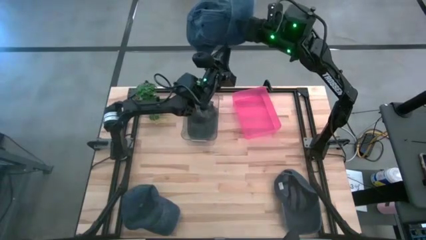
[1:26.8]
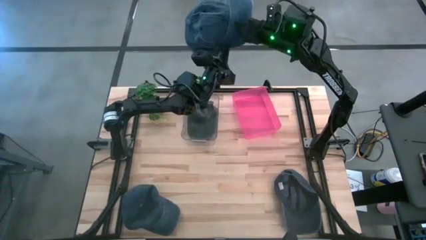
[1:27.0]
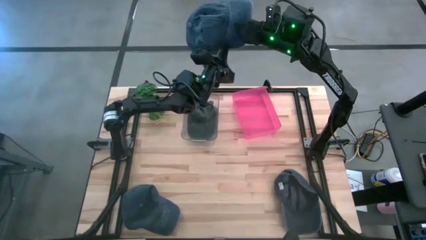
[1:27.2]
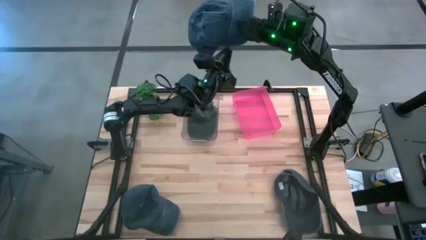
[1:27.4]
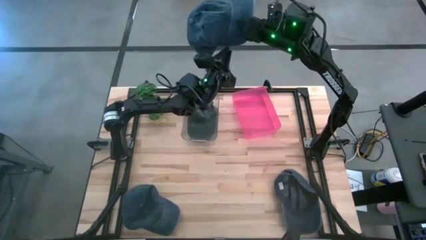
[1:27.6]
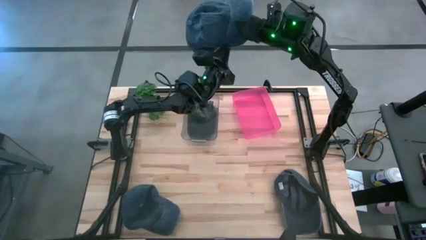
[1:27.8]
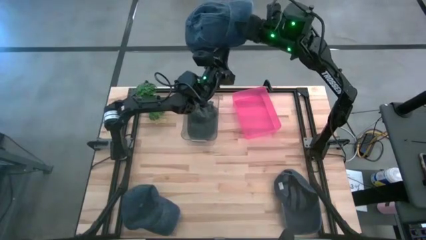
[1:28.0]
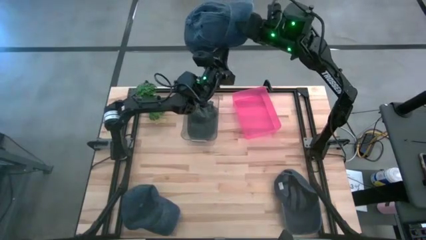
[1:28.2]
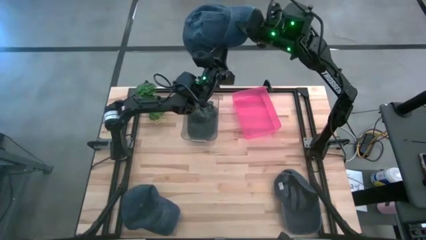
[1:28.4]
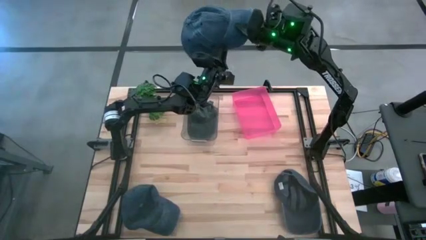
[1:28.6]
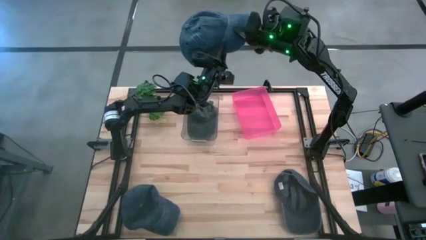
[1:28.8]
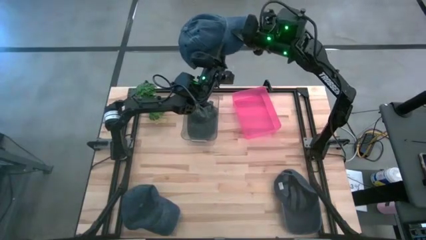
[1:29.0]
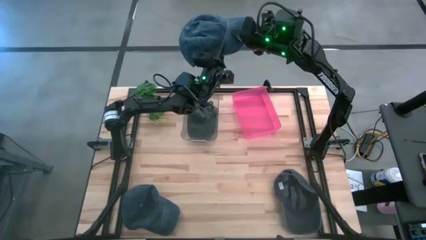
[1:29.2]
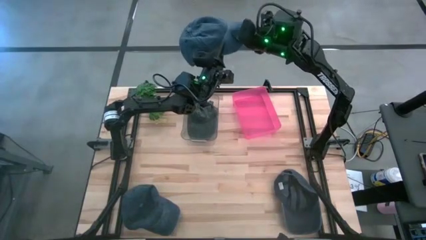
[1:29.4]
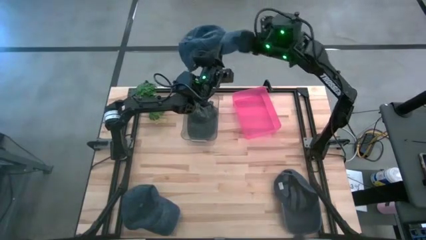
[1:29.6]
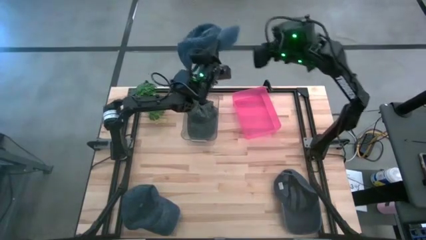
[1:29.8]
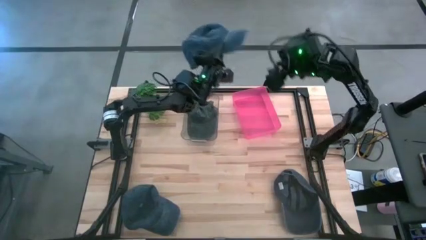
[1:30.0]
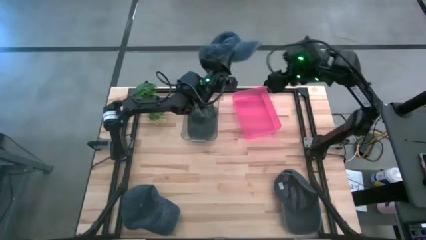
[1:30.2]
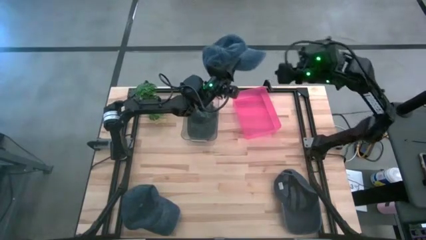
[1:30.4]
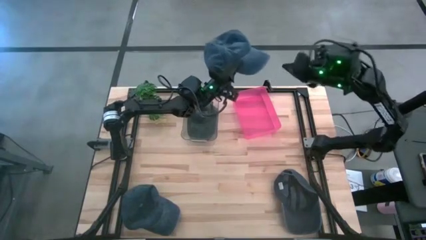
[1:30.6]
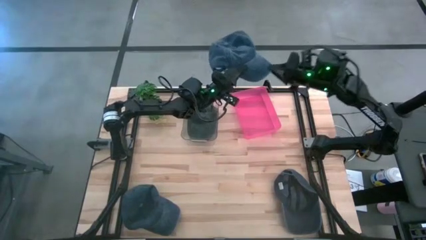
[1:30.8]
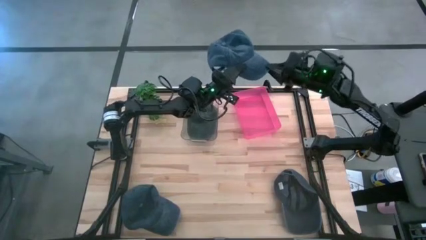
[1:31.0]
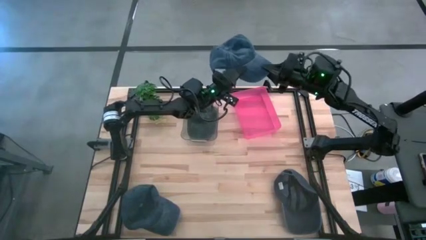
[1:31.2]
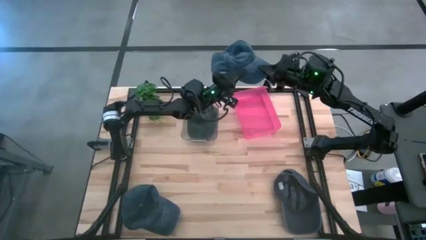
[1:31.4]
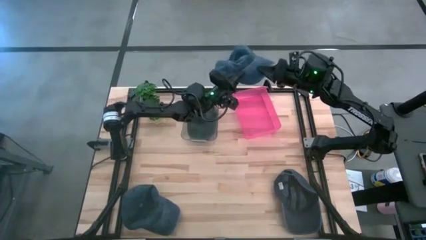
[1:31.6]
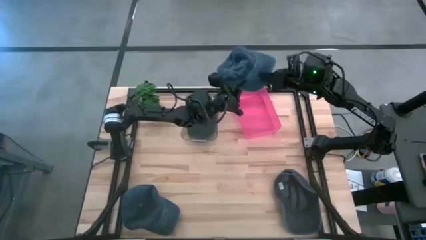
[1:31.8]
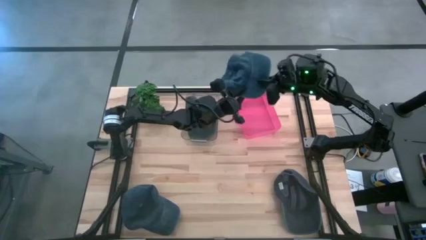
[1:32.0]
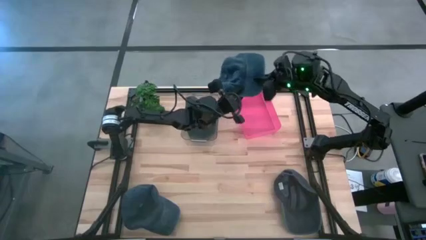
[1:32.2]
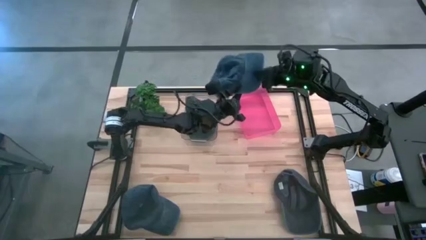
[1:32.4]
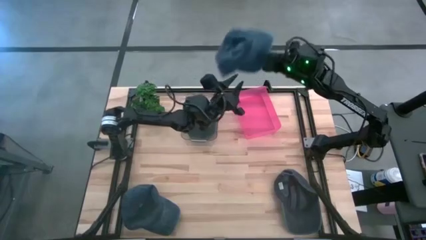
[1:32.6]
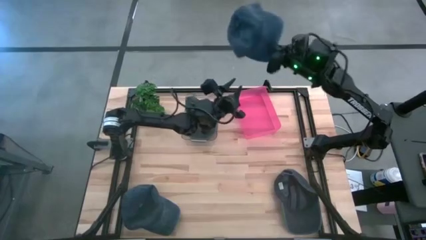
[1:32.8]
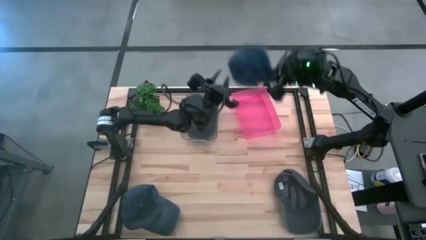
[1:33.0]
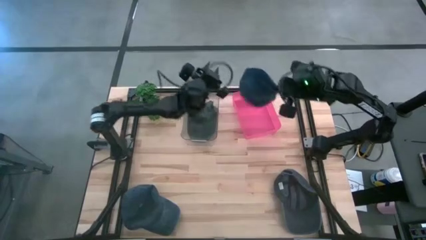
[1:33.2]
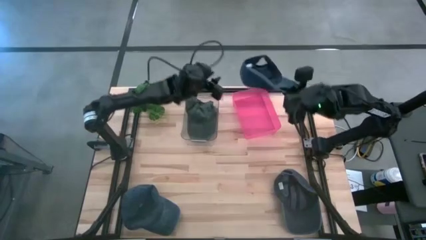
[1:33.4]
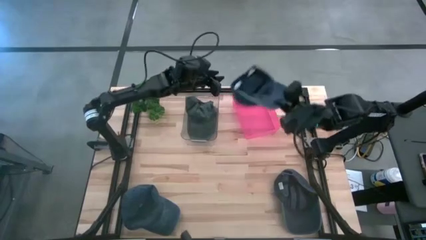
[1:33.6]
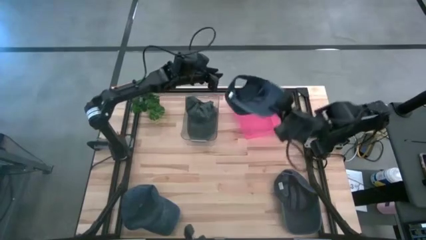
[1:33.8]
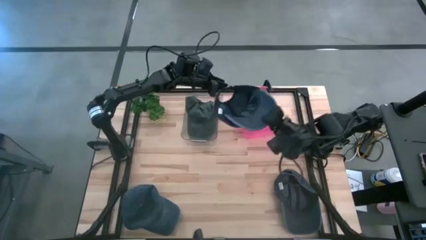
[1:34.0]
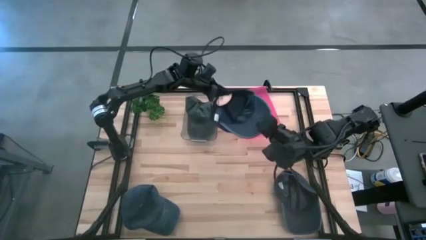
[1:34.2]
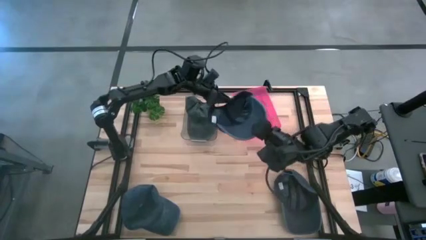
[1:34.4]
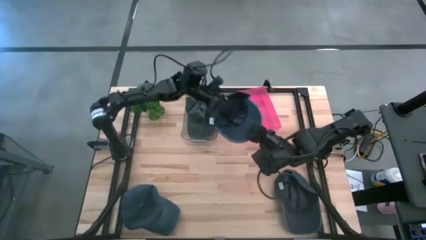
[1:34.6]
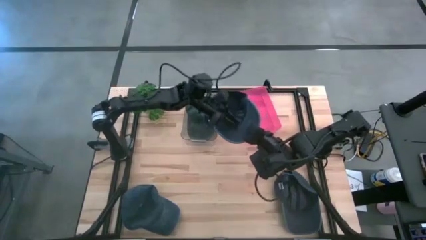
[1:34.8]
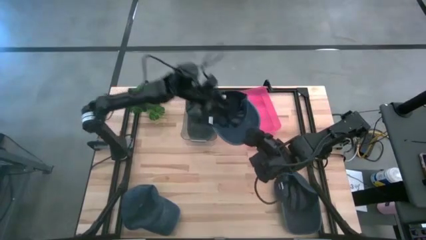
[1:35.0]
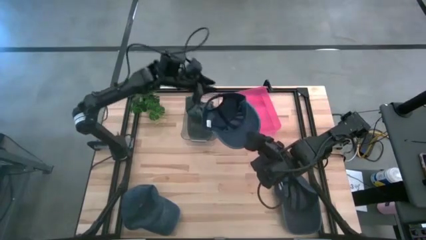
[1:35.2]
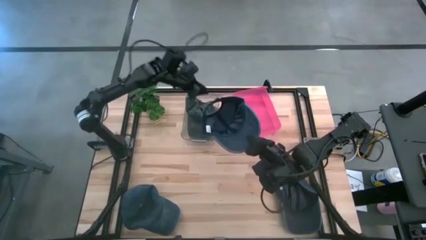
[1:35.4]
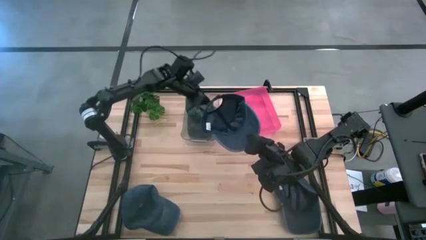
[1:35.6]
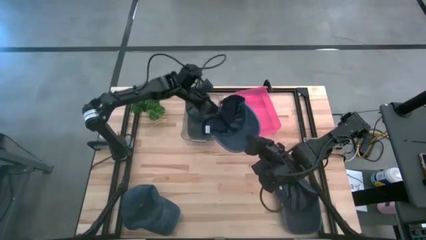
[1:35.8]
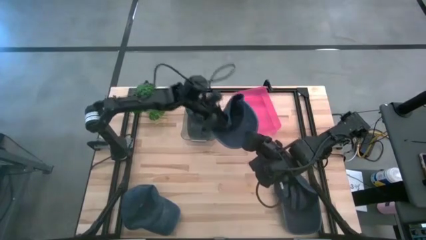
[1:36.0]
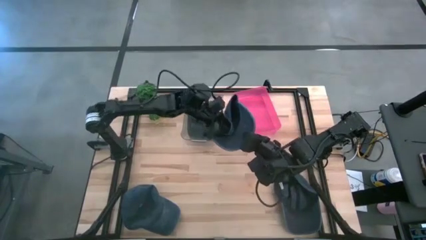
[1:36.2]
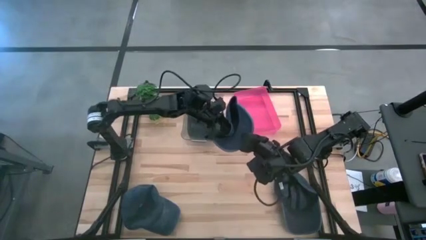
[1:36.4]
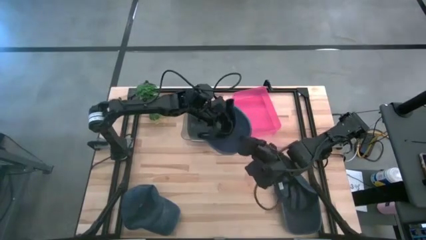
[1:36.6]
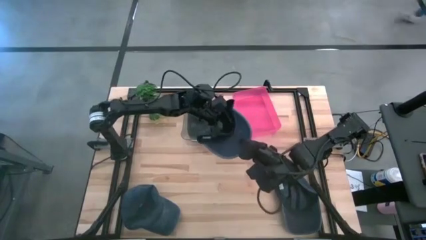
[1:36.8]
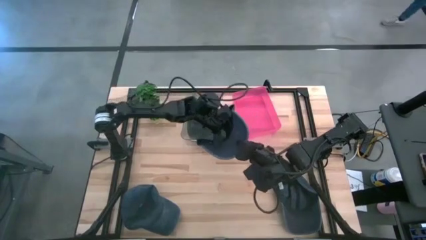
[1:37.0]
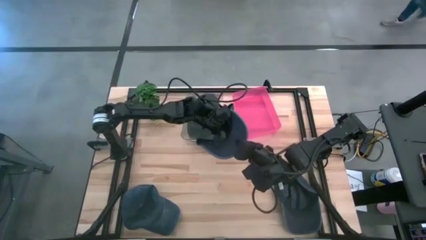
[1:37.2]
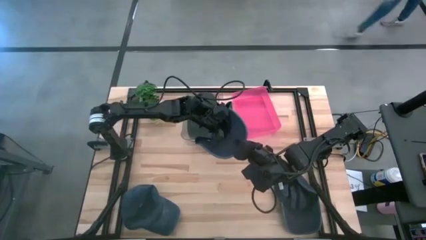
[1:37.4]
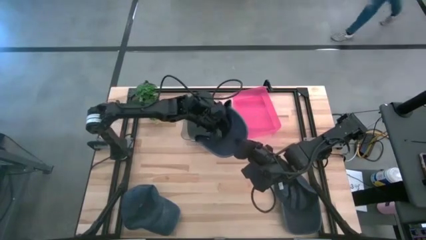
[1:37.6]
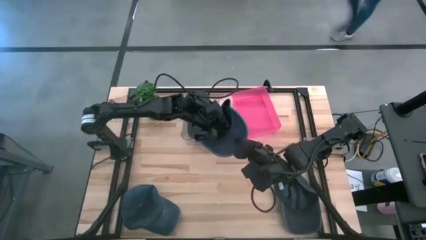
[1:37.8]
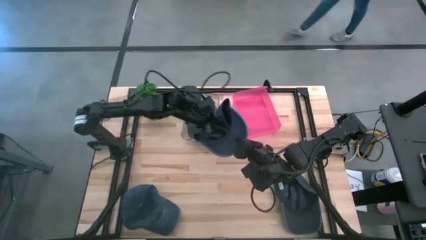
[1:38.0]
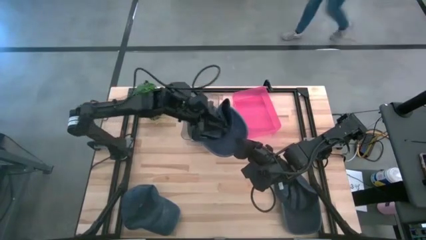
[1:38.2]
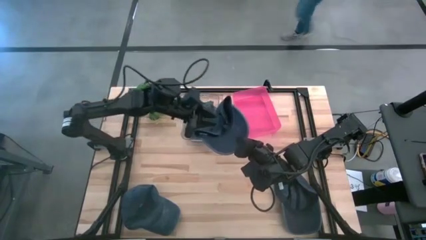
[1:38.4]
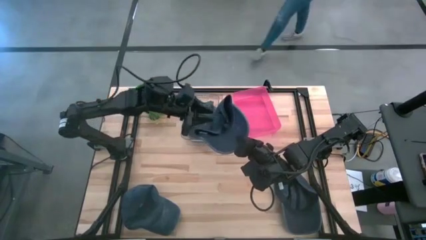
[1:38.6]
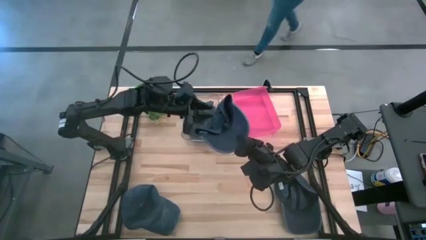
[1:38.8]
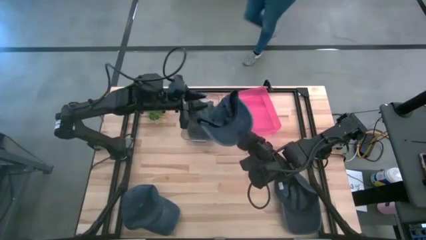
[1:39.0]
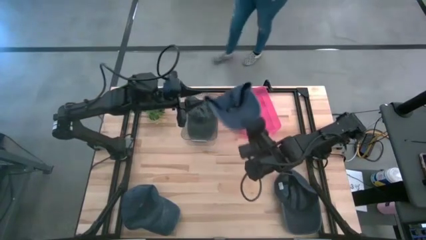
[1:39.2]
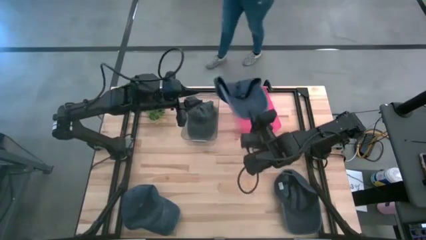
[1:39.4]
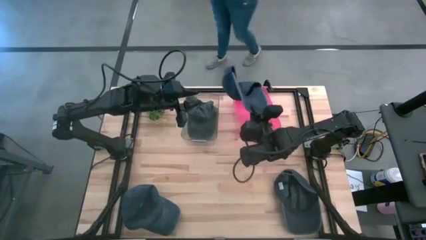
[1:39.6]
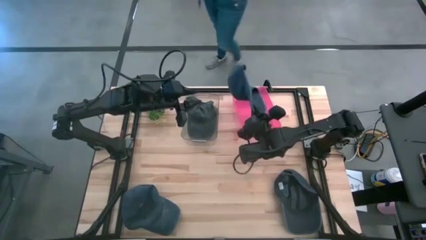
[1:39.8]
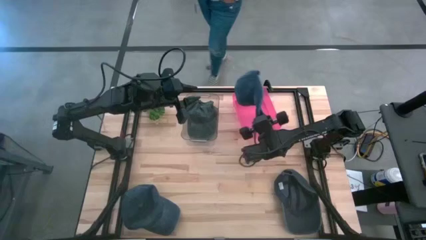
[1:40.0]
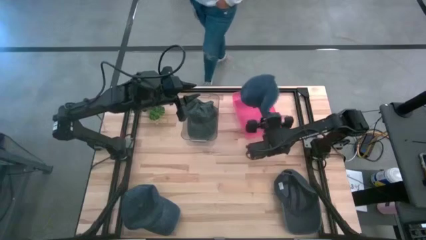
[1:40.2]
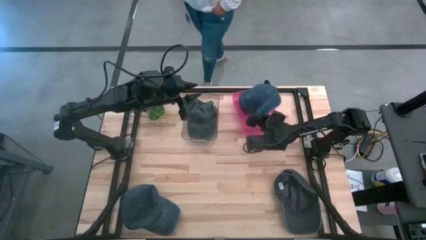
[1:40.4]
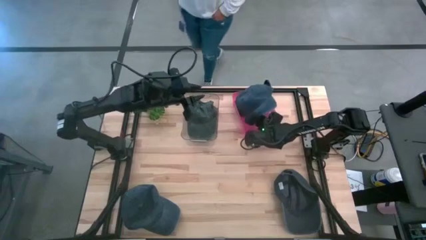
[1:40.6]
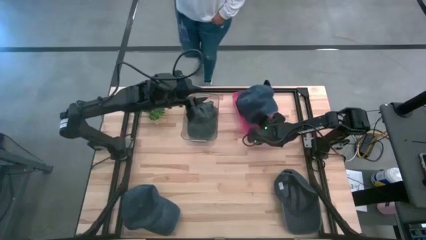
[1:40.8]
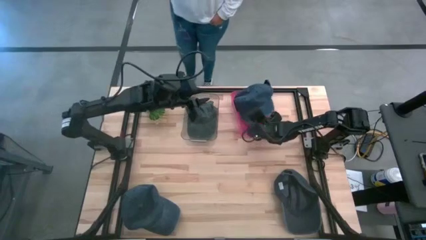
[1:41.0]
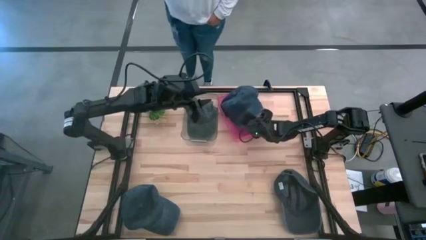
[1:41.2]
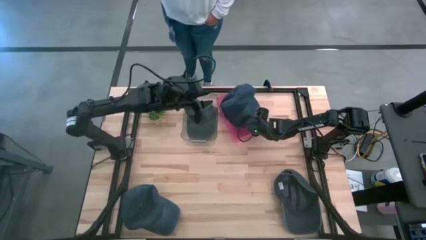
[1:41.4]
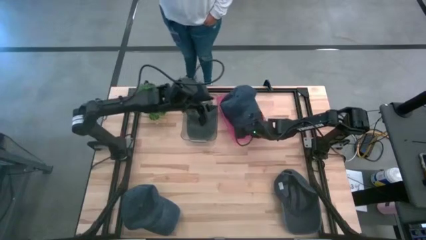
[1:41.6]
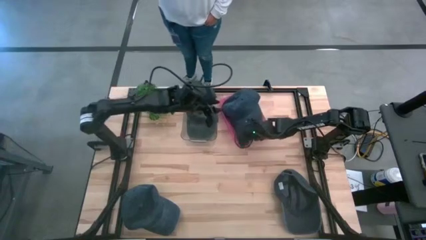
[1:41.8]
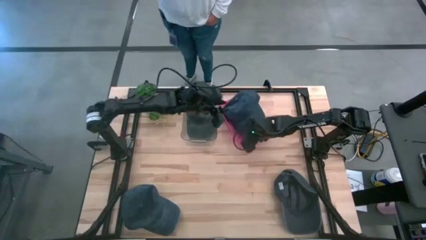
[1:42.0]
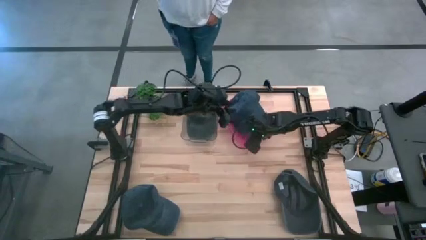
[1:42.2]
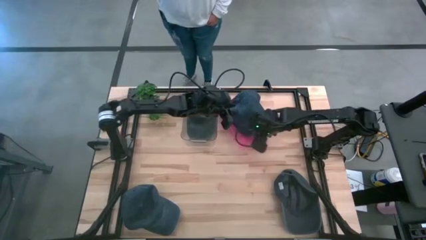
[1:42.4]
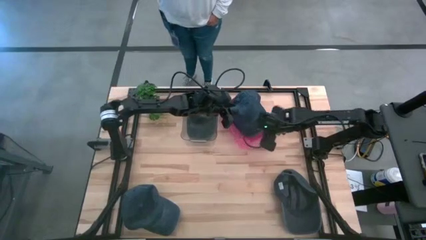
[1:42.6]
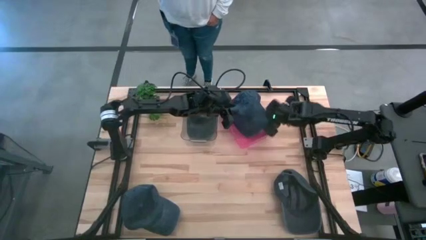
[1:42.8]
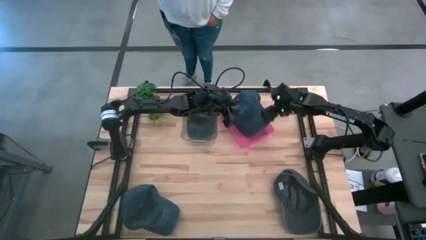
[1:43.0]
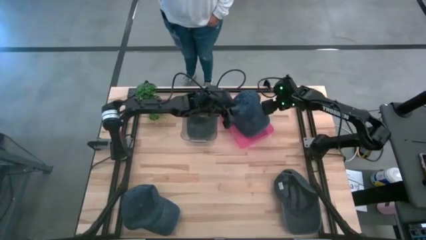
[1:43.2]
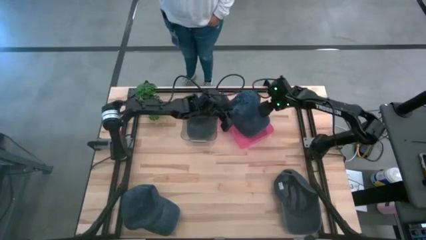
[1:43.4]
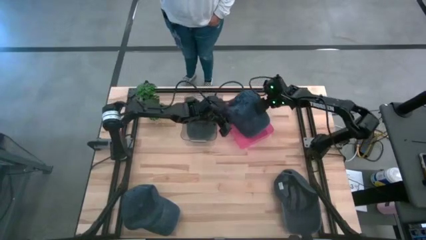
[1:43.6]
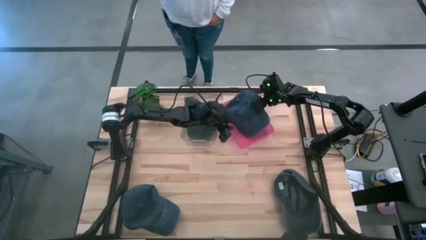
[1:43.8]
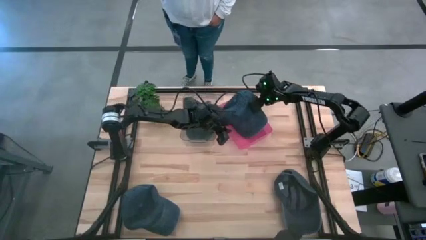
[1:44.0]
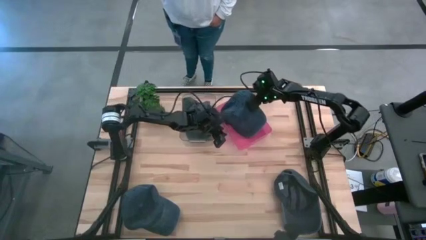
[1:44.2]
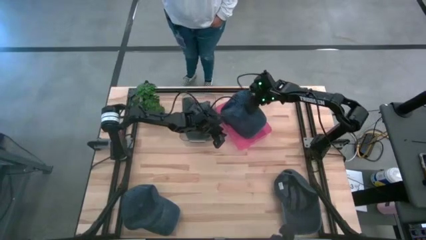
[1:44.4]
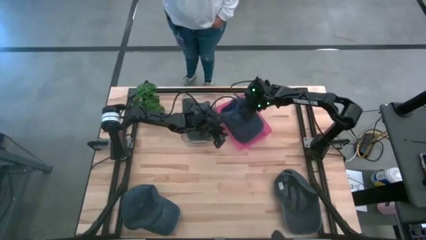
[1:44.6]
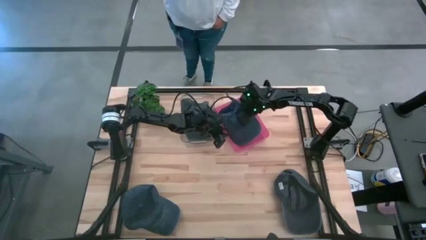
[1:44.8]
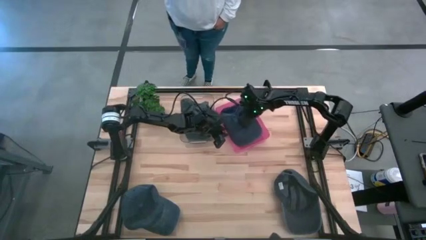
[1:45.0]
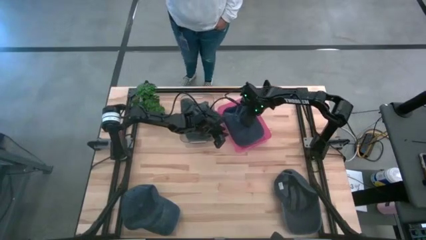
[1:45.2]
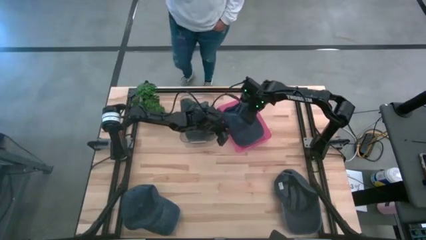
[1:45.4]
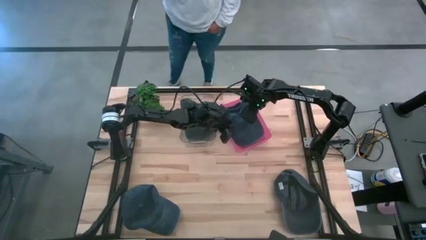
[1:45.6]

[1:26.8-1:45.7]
Task: Pick & Place hat
Put the middle blue cap into the red bin
